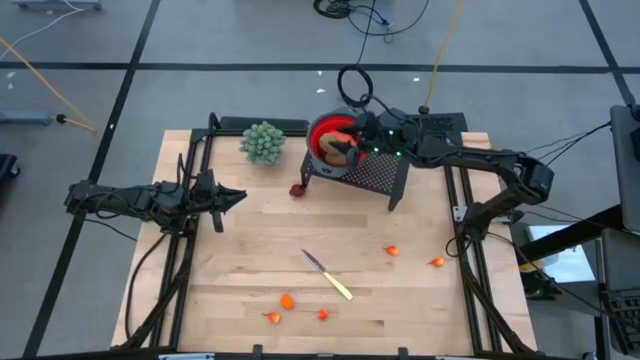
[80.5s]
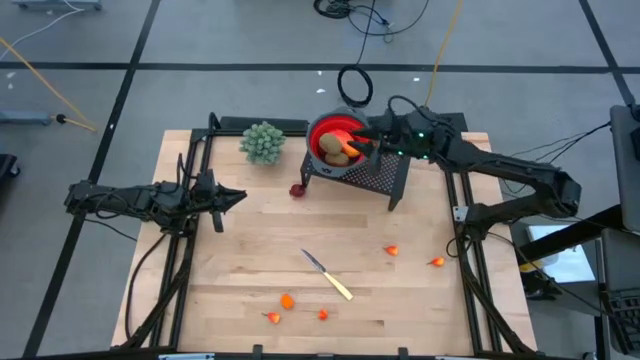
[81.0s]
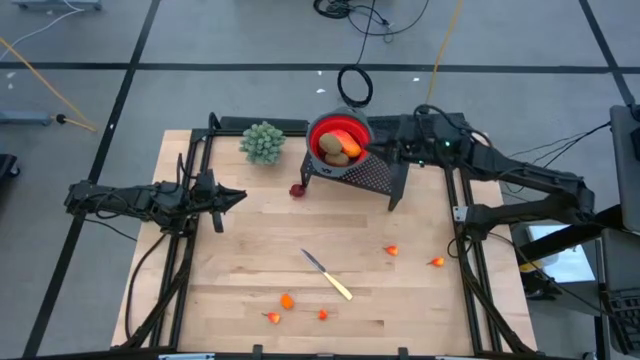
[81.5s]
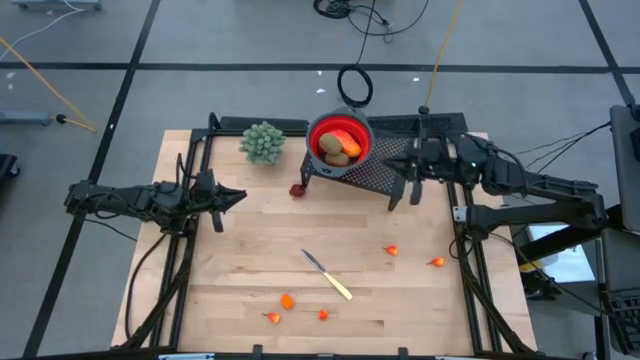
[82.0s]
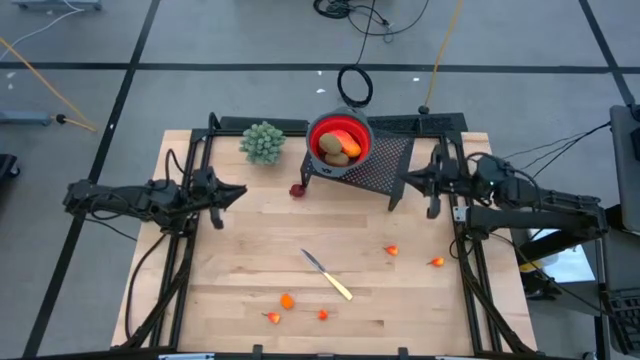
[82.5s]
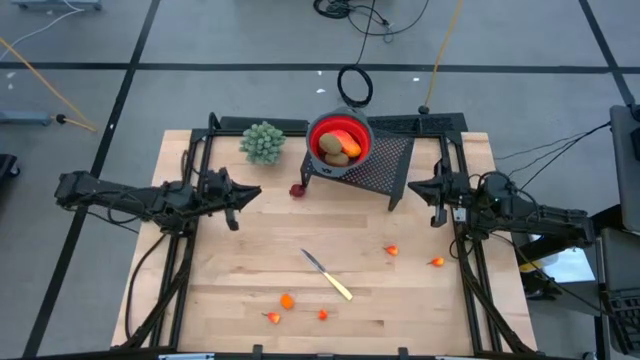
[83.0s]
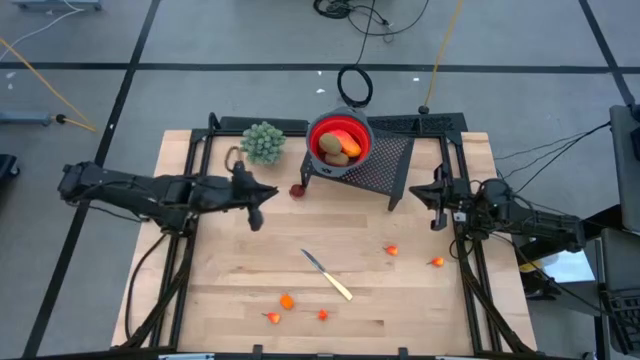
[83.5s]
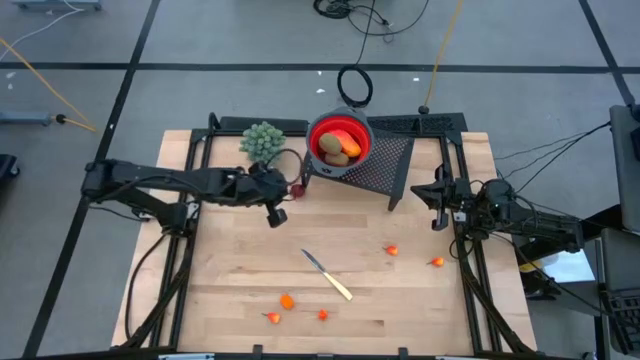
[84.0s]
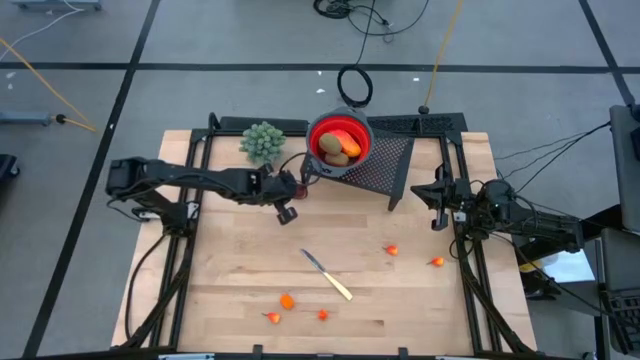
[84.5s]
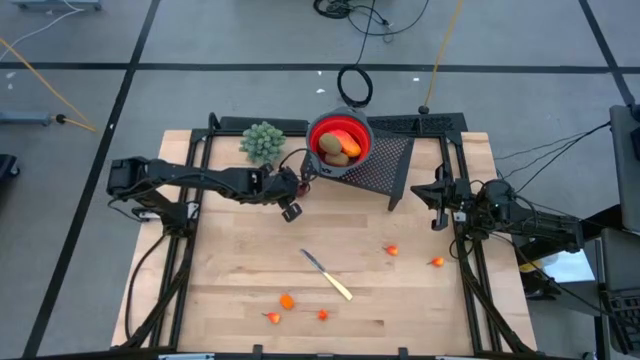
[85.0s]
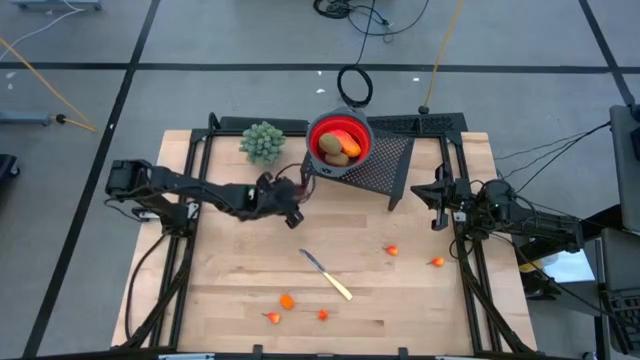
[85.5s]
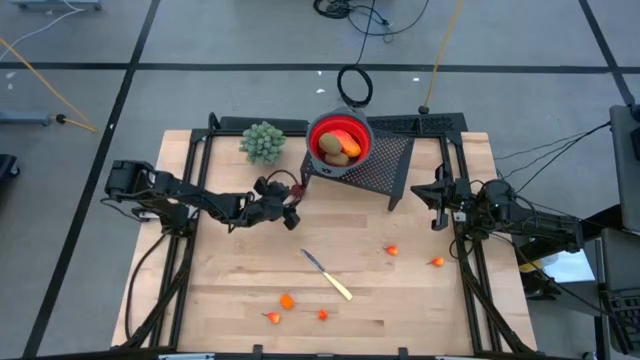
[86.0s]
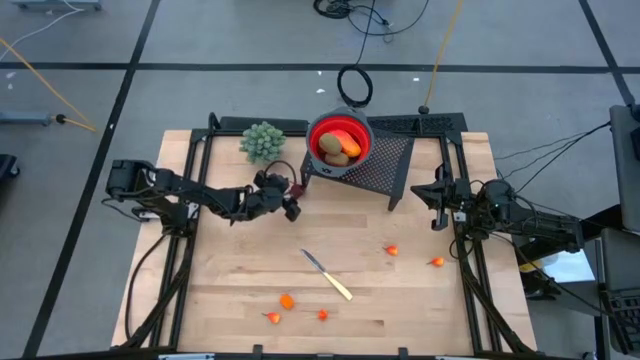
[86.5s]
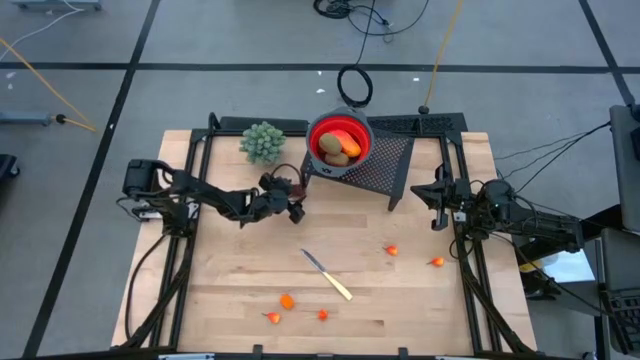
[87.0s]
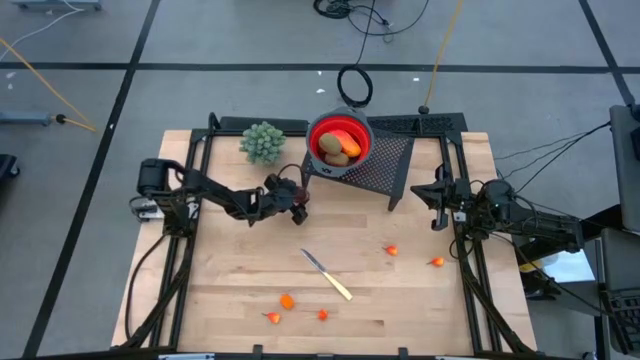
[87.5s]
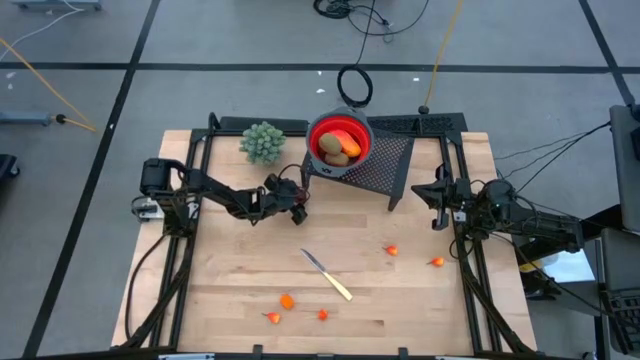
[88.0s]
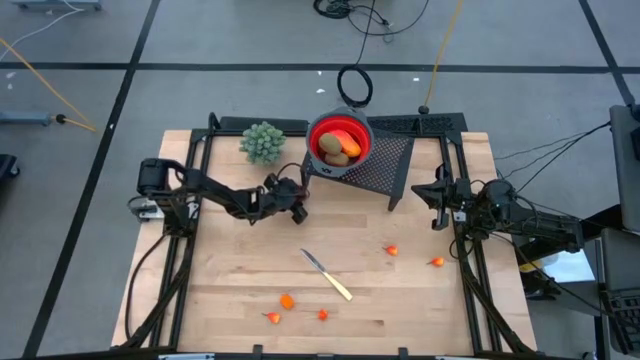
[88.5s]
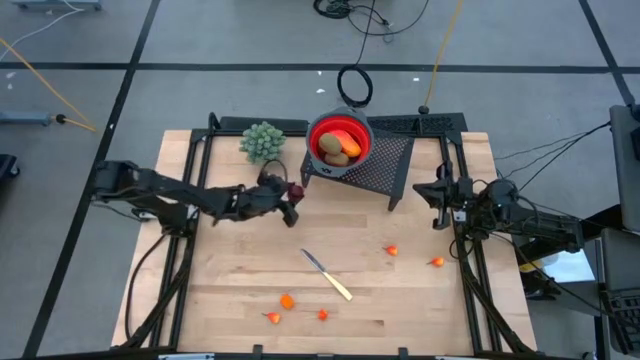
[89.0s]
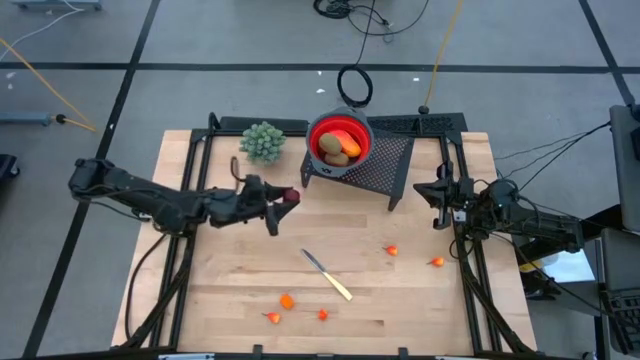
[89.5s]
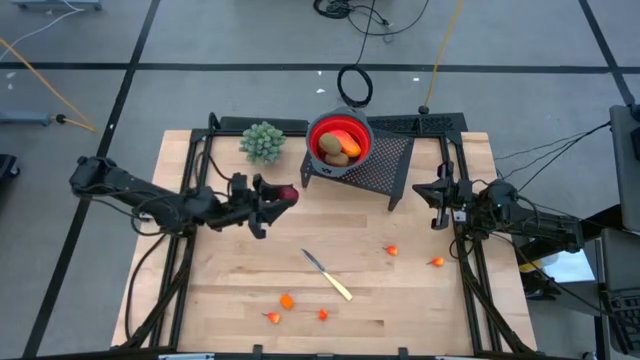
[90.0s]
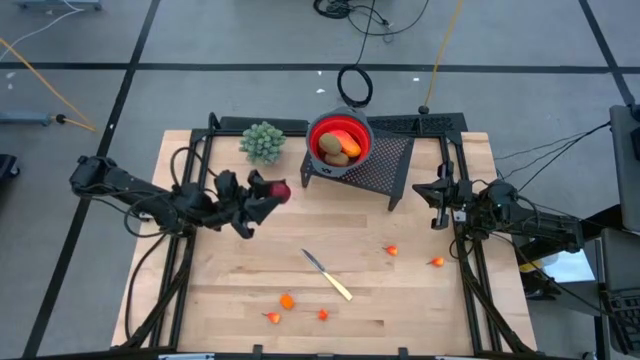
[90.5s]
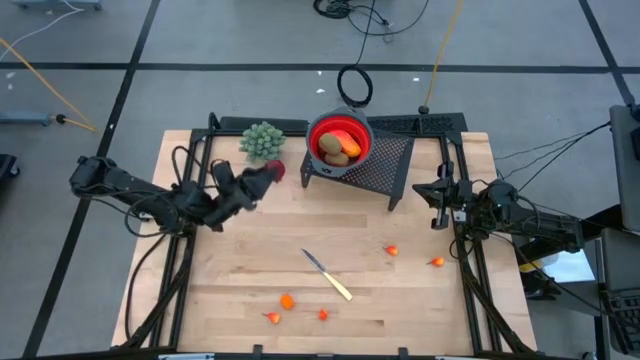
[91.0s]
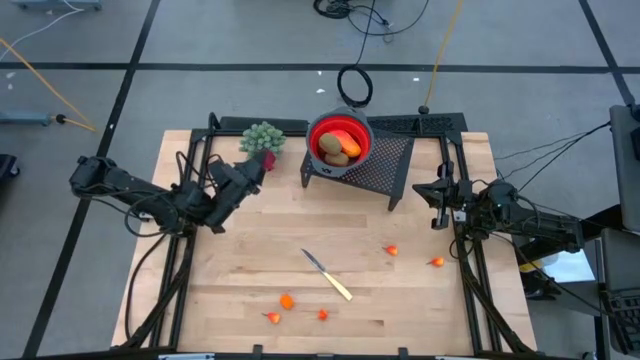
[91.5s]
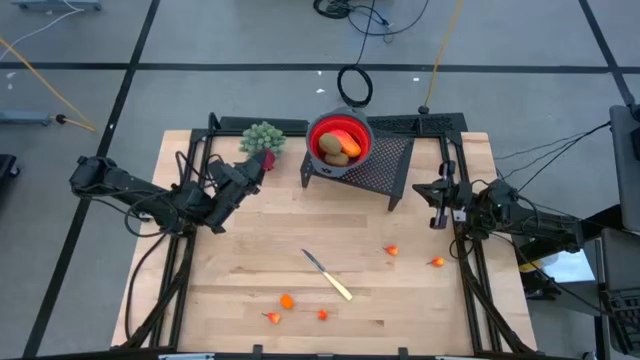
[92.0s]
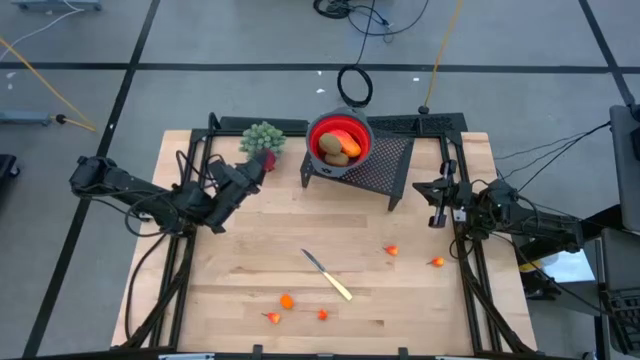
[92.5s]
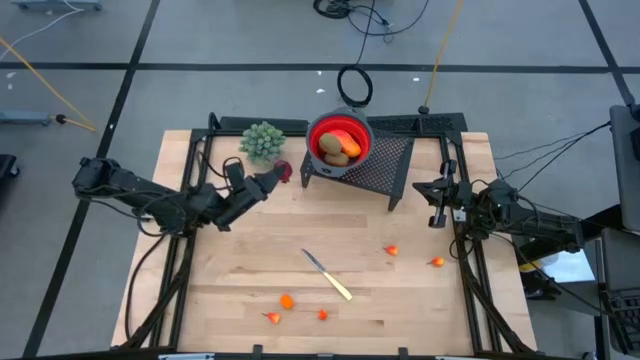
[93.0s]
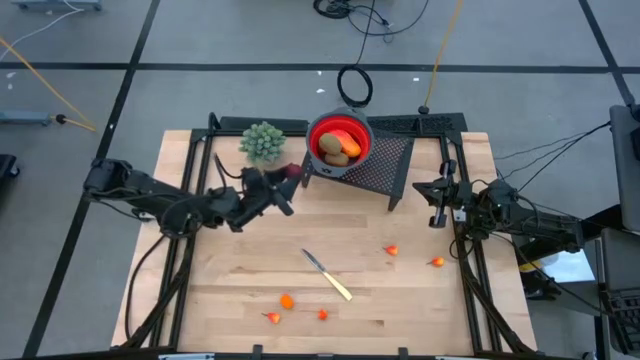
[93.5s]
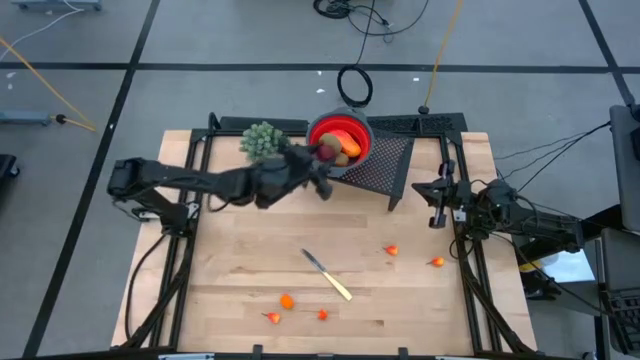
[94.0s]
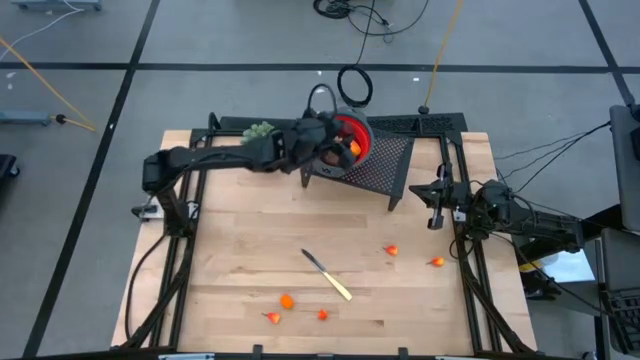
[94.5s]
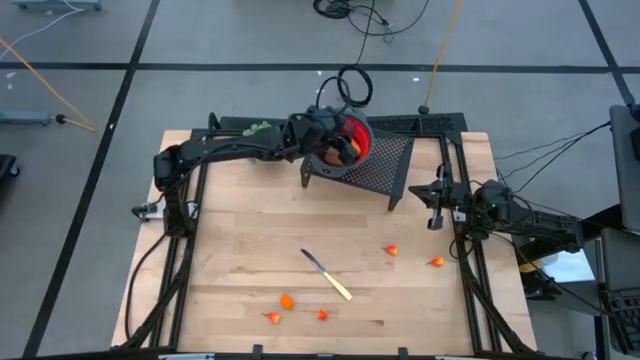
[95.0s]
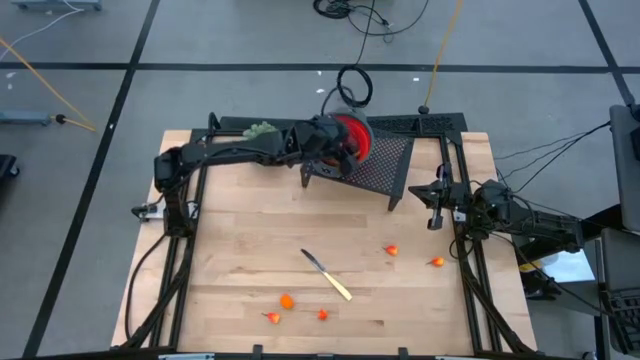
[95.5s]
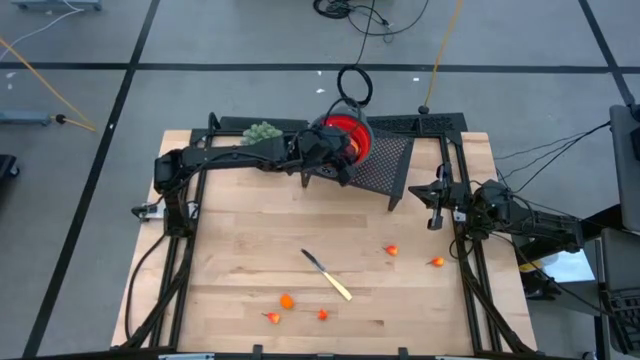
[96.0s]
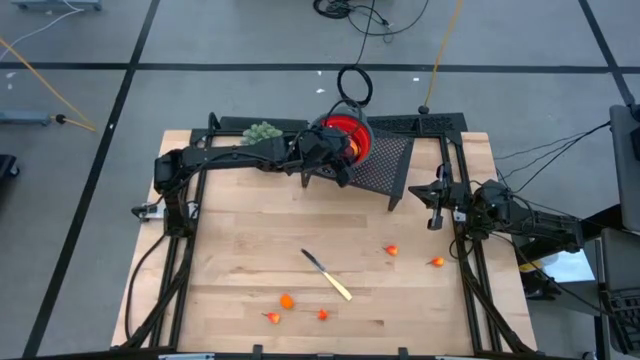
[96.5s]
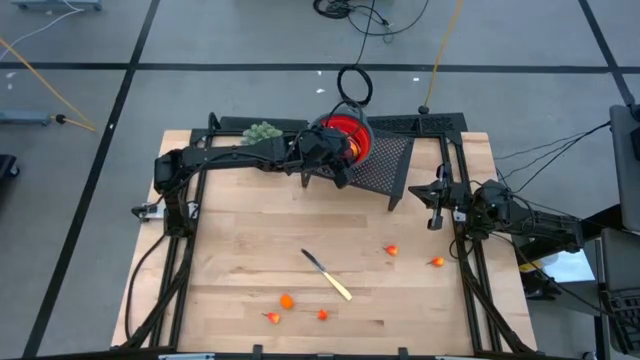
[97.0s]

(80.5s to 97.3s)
Task: Pick & Place Fruit
Put the red pomegranate into the red strainer bowl on the shelf

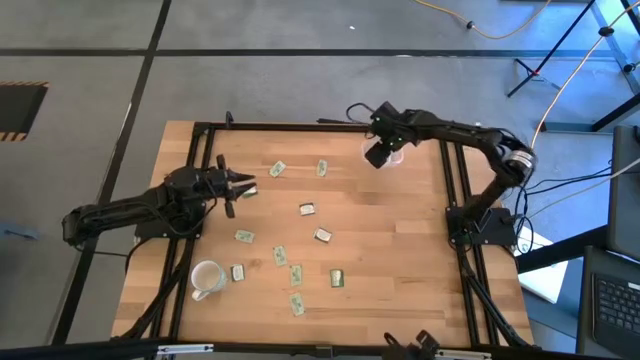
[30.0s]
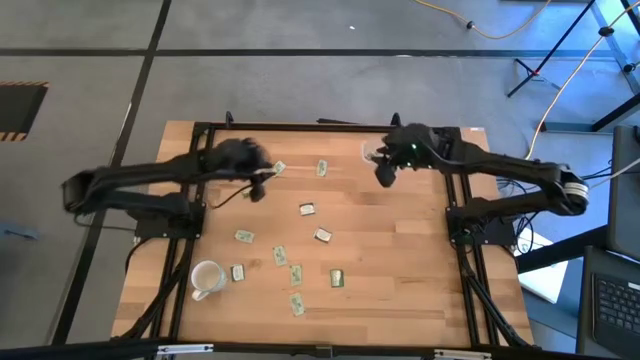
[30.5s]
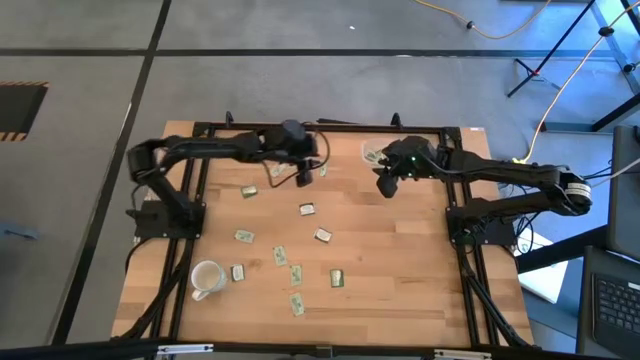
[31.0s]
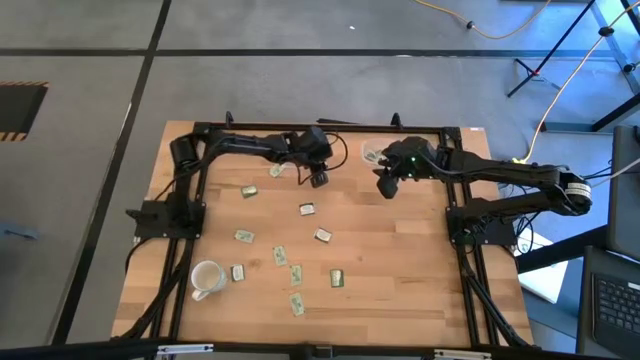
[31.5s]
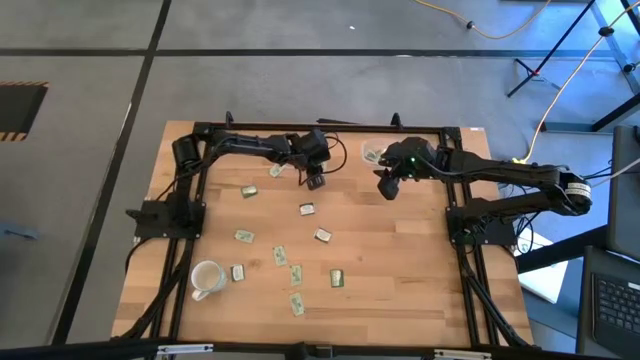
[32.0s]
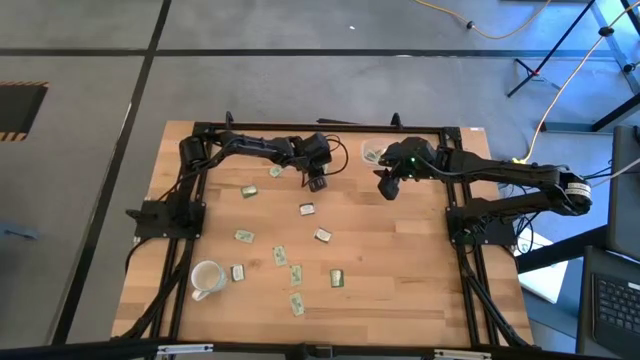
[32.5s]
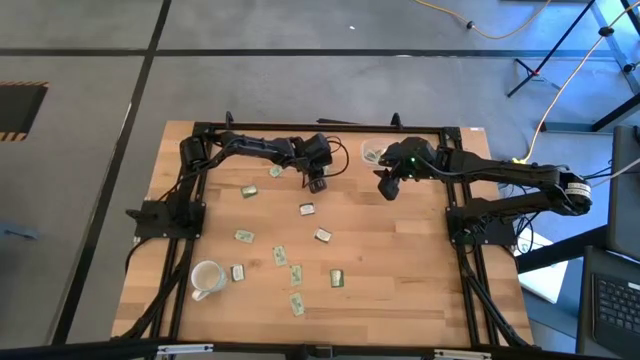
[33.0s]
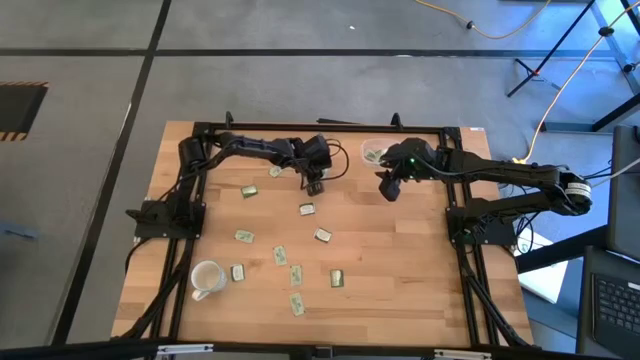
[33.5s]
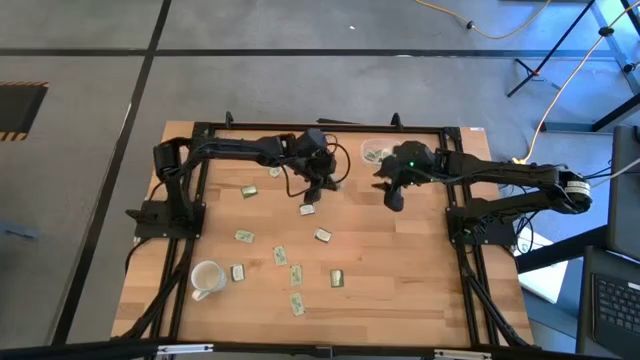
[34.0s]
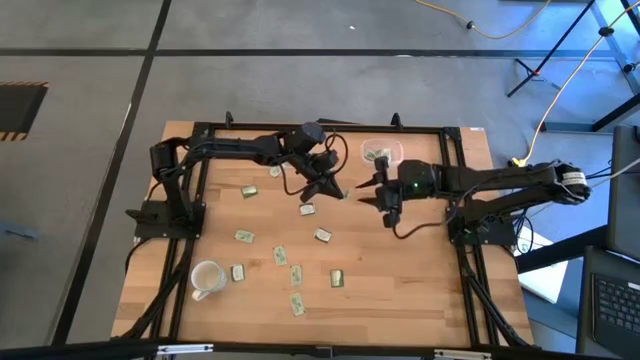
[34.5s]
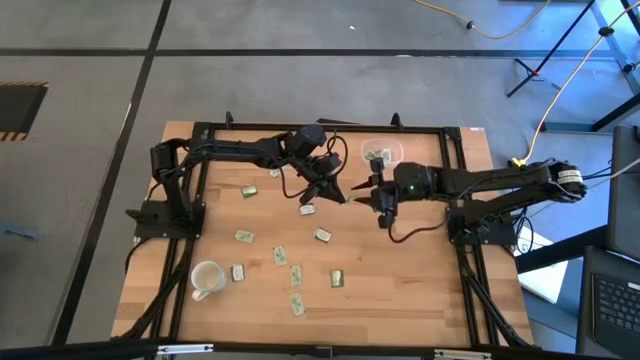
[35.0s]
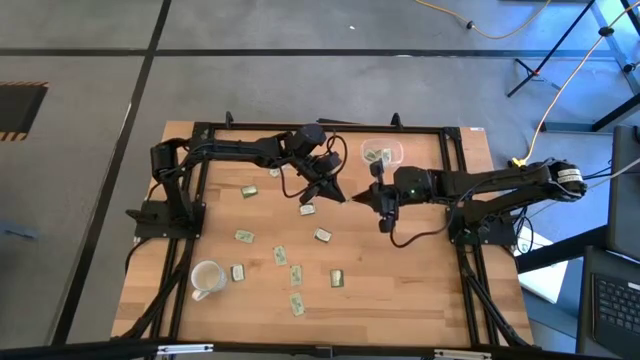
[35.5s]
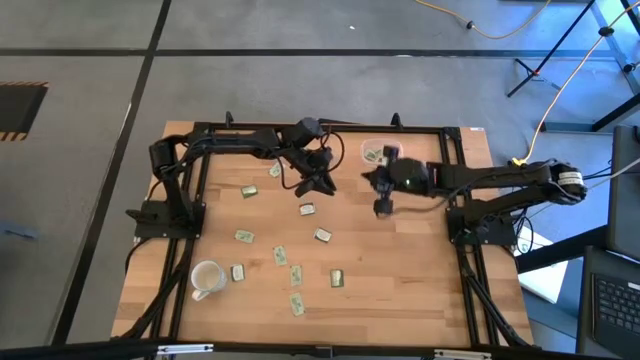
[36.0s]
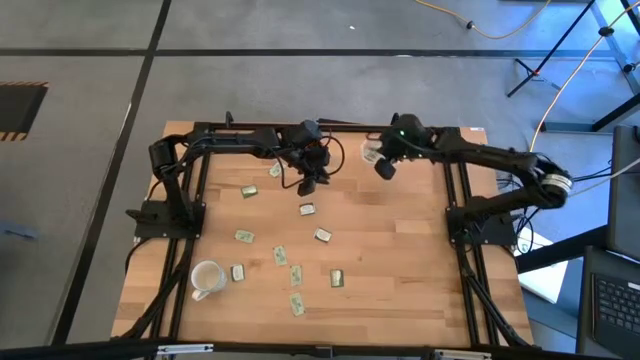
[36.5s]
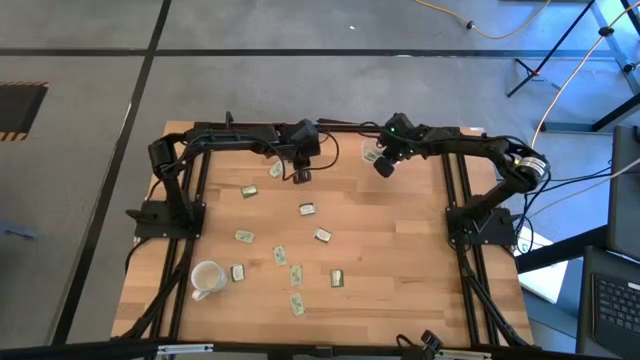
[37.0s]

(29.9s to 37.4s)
Task: Pick and place Stevia / Truvia into bins
Put the green stevia packet into the transparent container
